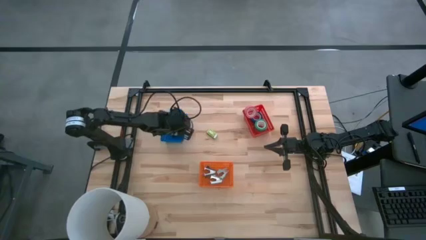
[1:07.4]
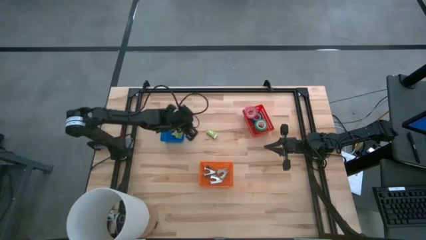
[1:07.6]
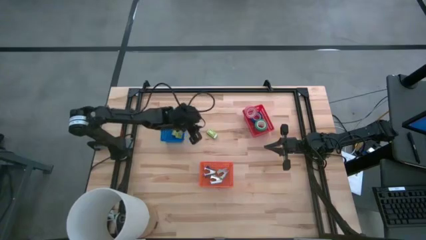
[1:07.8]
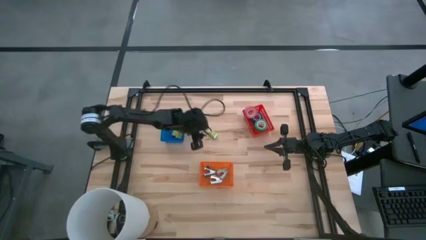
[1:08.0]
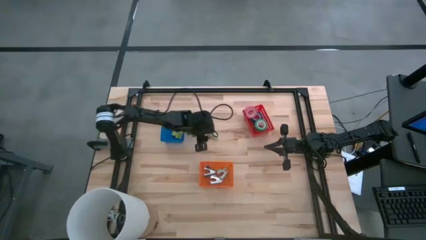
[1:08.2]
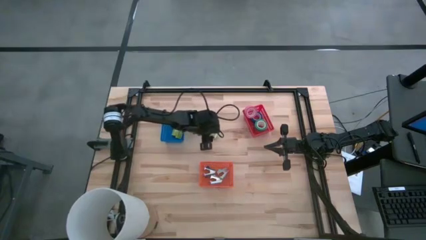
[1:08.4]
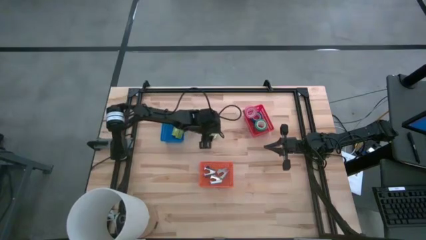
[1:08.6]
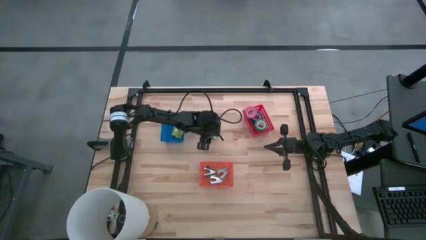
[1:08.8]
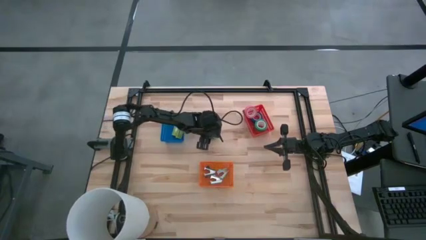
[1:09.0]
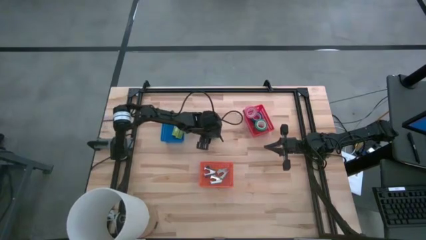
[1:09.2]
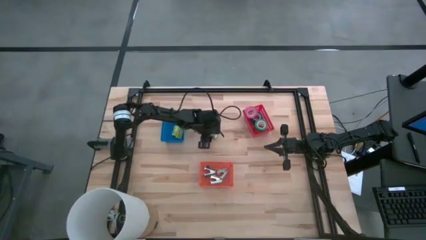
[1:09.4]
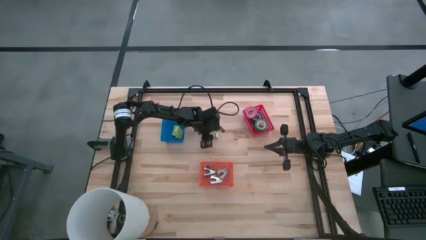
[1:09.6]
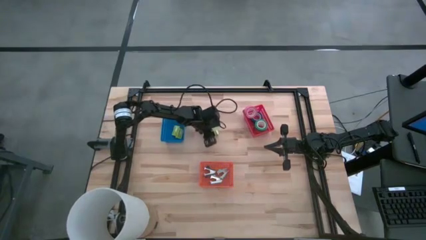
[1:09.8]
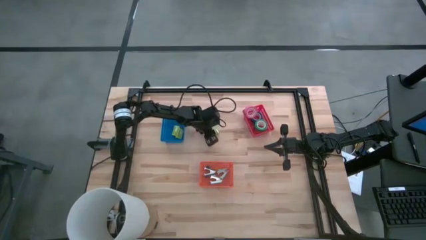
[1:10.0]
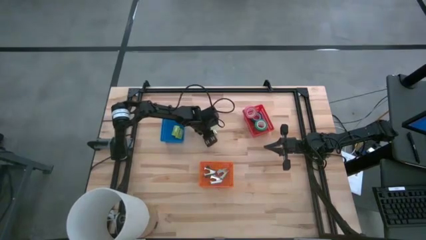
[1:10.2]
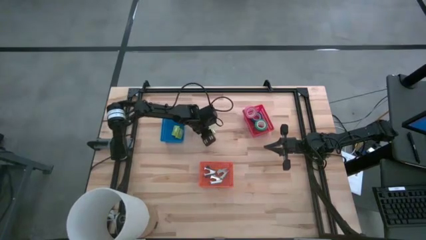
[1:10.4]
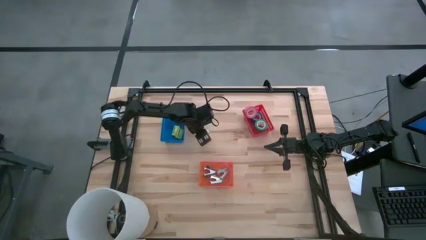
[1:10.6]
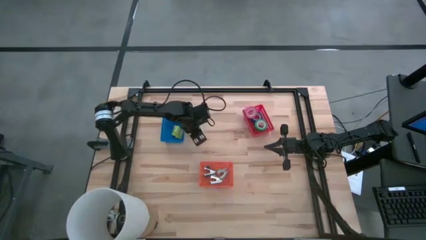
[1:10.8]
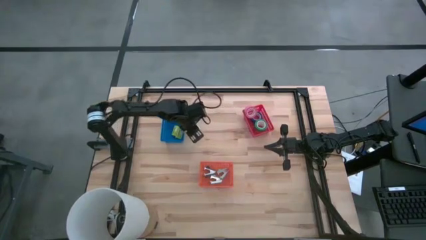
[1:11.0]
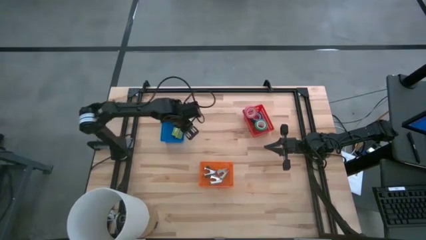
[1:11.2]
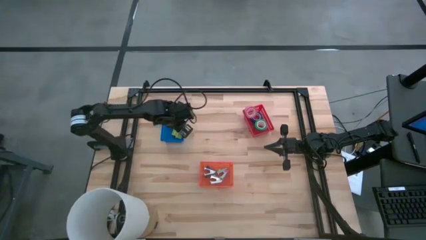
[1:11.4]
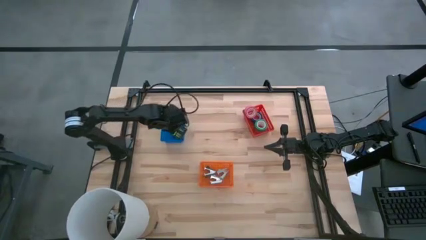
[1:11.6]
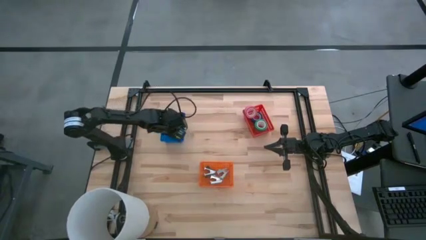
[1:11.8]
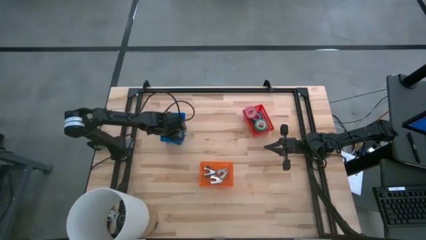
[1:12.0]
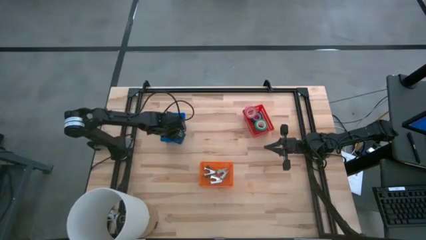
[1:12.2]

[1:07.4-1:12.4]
Task: Pick and place Stapler, Stapler remover, tape
Put the green staple wire box into the blue basket

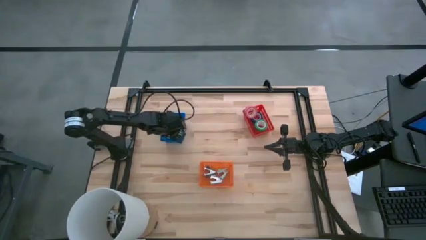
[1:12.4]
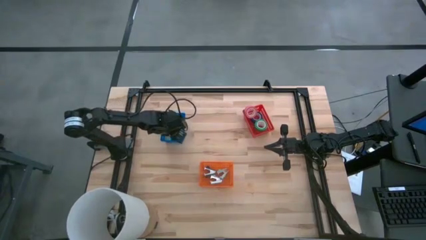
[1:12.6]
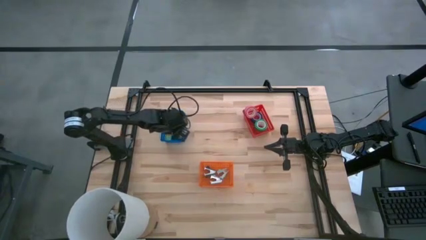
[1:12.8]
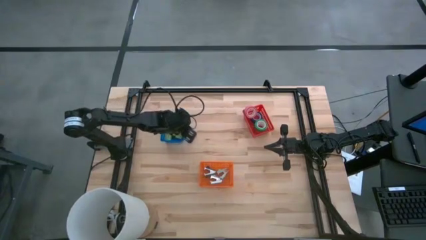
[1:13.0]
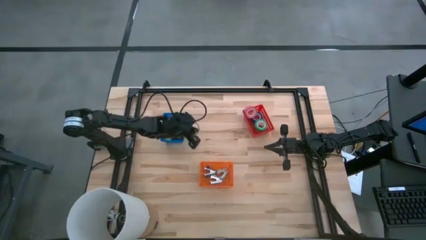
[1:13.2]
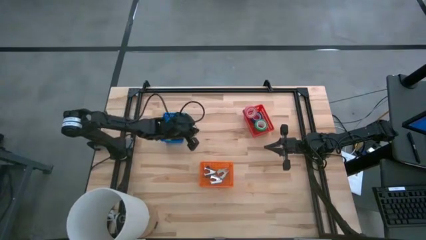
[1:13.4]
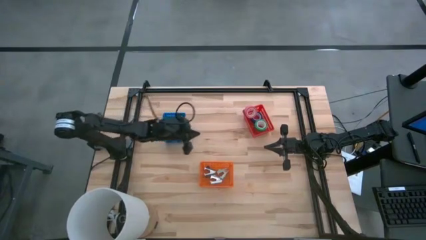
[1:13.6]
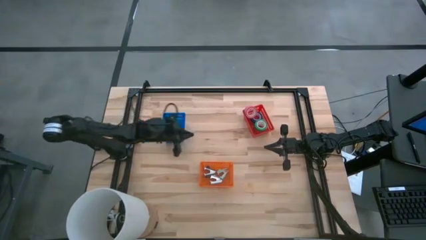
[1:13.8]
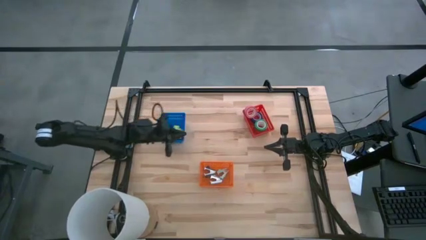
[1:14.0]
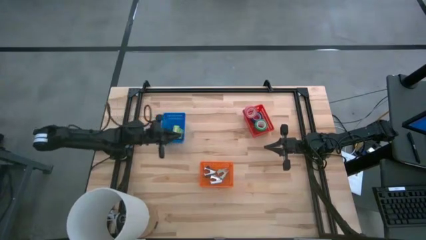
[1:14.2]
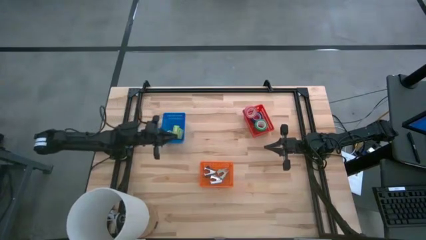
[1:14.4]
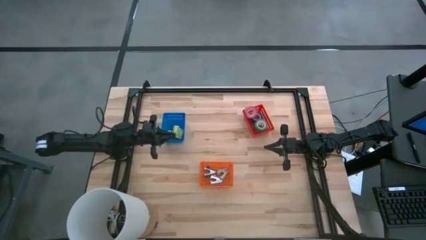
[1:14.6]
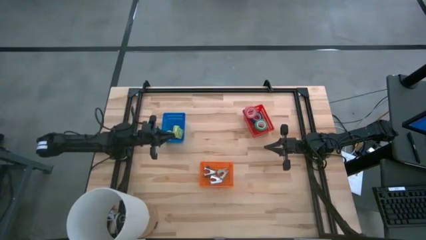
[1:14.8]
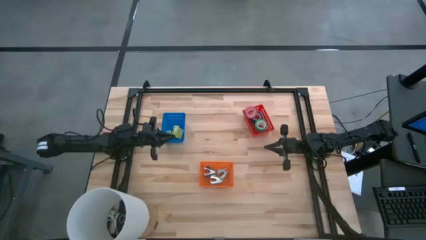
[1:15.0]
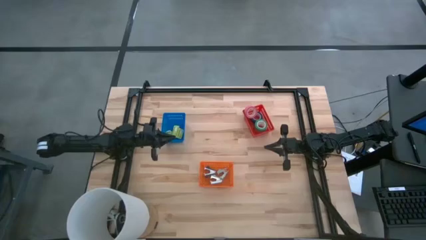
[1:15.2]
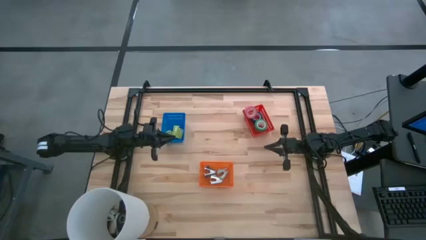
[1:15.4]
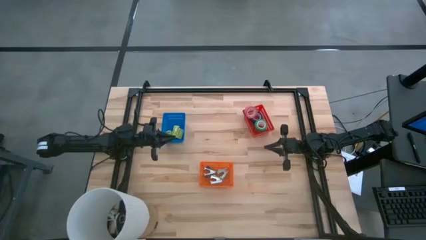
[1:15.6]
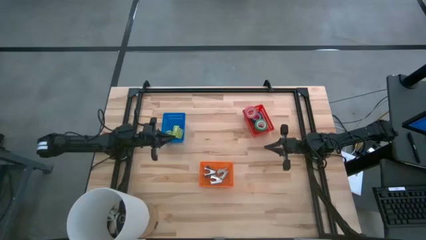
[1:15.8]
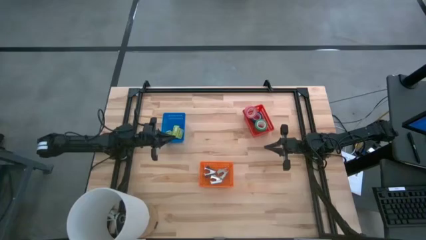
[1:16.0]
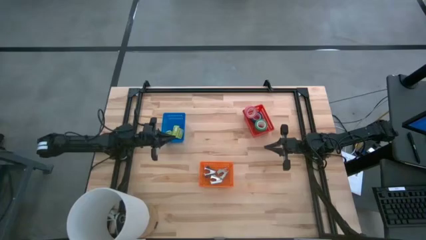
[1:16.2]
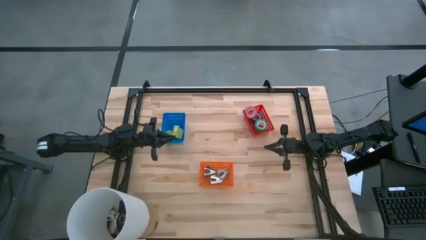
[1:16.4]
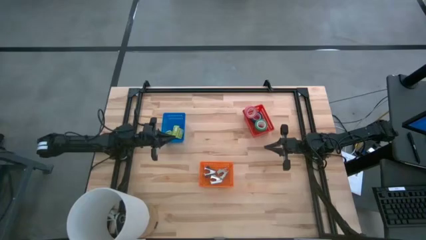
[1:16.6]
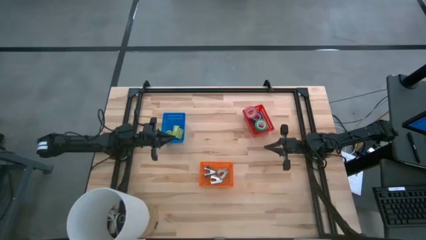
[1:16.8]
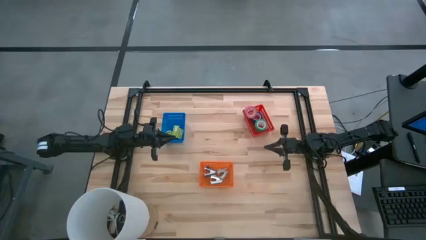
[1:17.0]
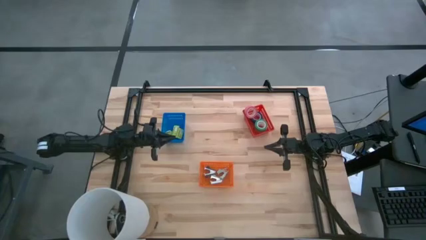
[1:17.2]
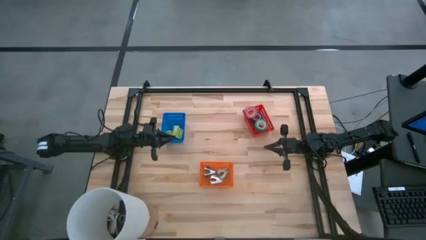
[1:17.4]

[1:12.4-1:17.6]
Return to Home Position

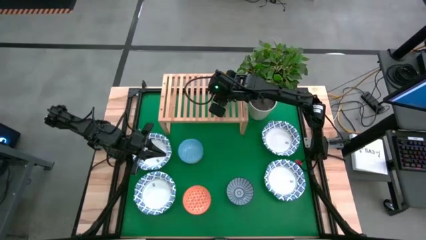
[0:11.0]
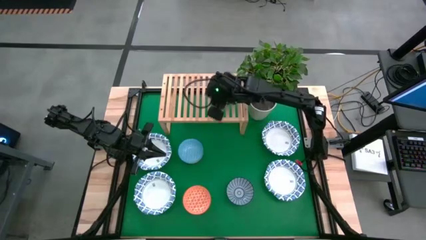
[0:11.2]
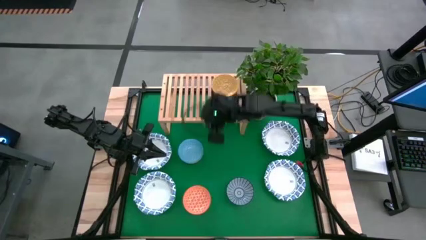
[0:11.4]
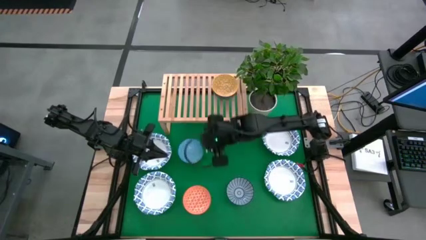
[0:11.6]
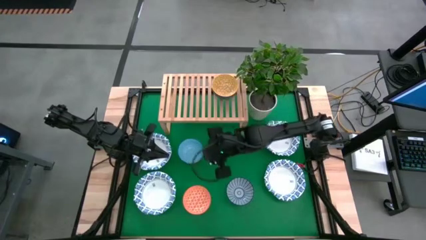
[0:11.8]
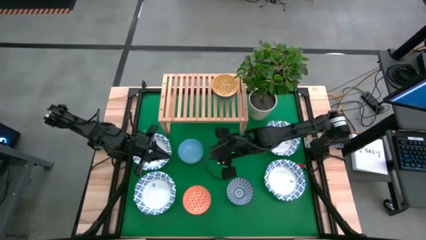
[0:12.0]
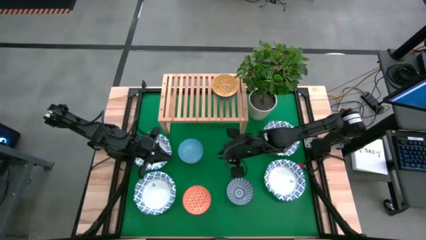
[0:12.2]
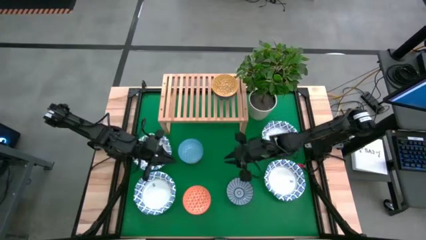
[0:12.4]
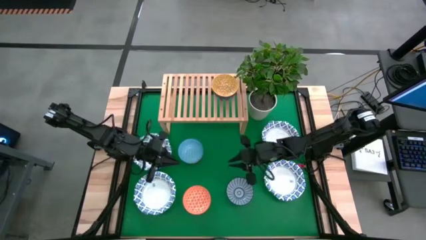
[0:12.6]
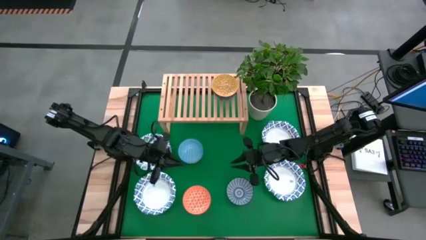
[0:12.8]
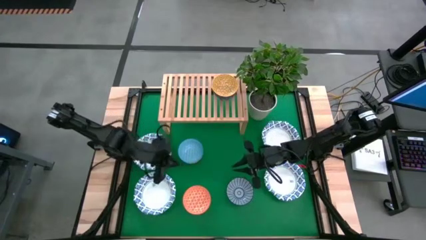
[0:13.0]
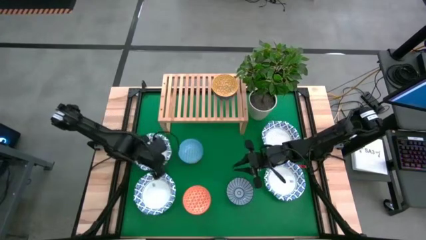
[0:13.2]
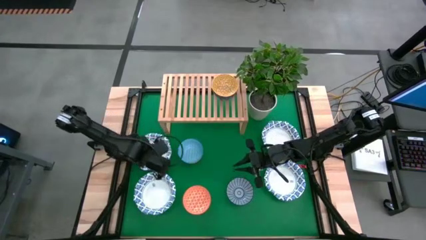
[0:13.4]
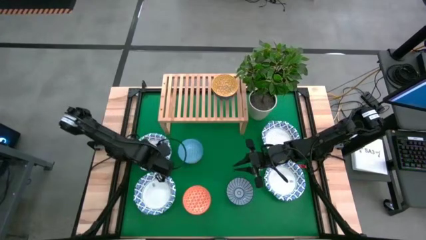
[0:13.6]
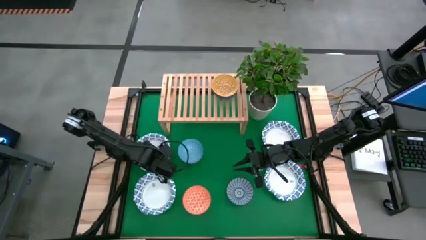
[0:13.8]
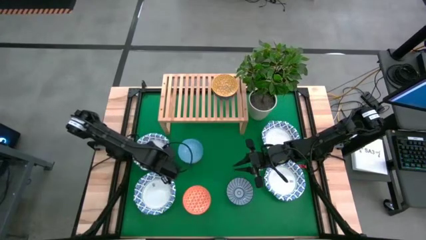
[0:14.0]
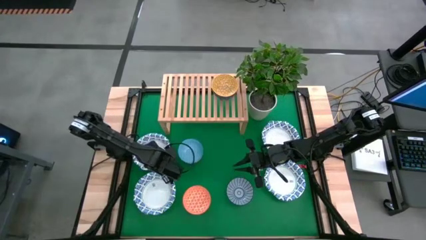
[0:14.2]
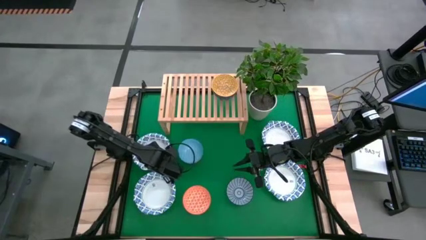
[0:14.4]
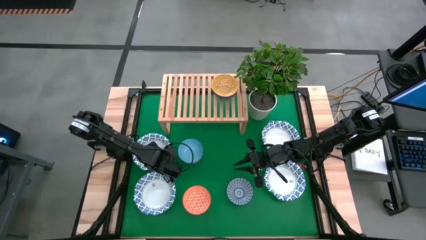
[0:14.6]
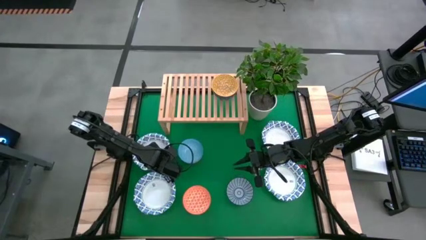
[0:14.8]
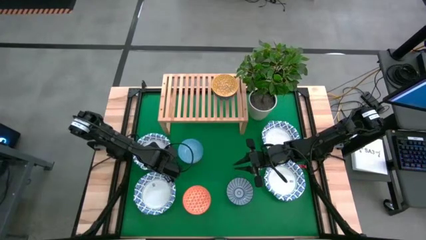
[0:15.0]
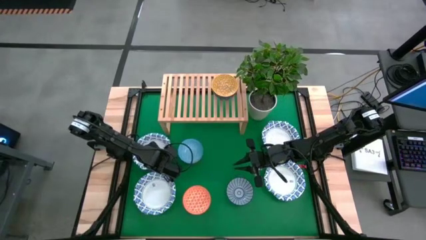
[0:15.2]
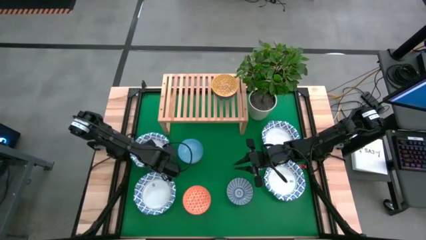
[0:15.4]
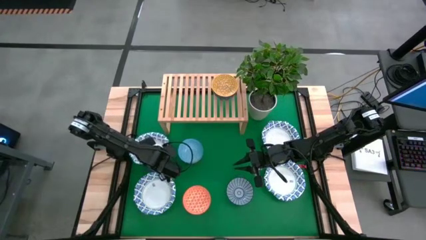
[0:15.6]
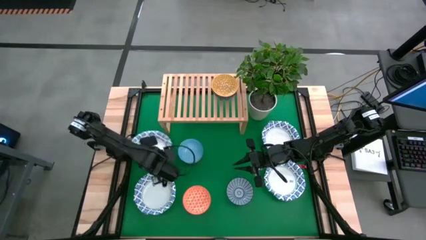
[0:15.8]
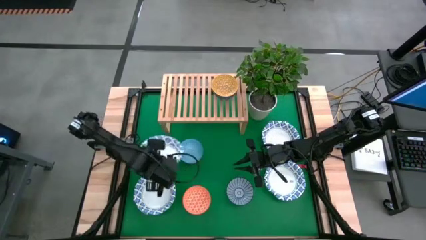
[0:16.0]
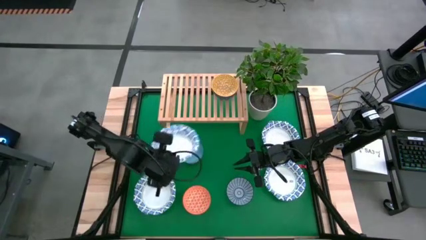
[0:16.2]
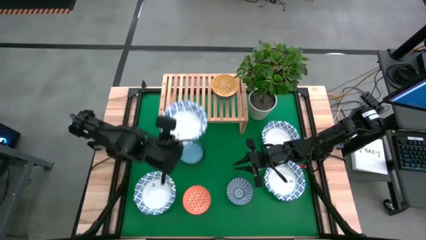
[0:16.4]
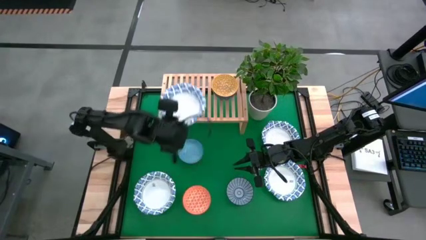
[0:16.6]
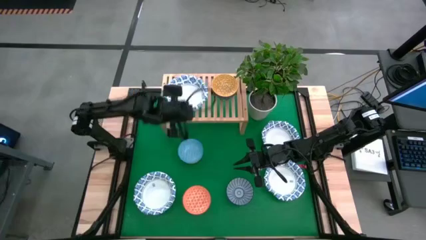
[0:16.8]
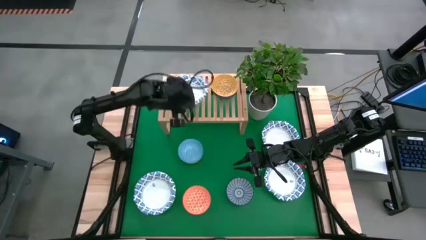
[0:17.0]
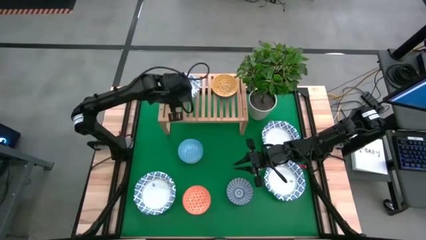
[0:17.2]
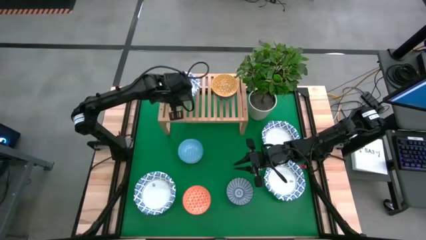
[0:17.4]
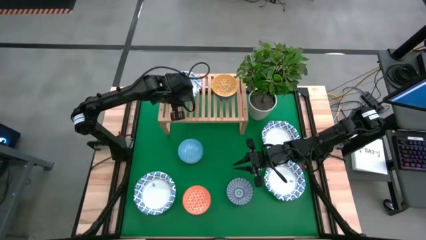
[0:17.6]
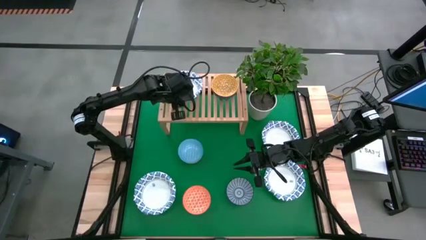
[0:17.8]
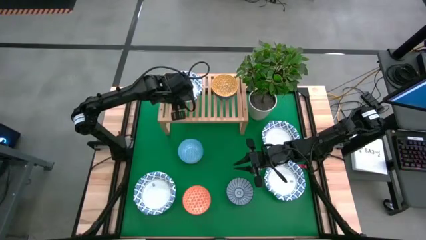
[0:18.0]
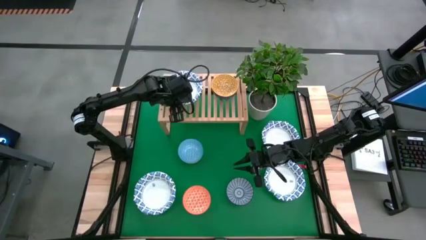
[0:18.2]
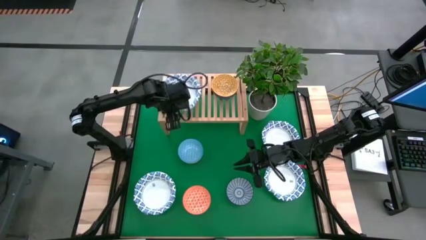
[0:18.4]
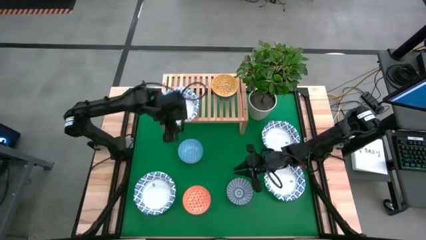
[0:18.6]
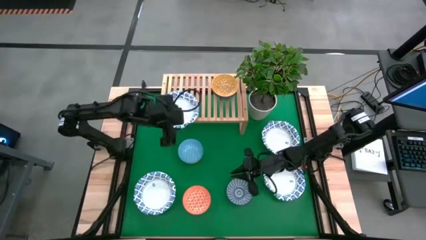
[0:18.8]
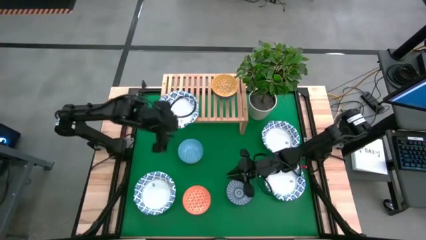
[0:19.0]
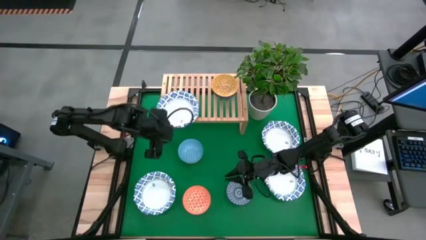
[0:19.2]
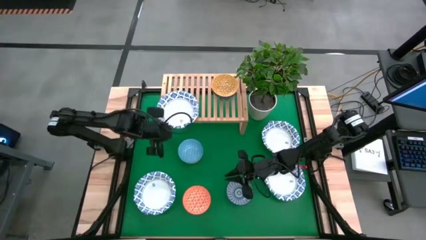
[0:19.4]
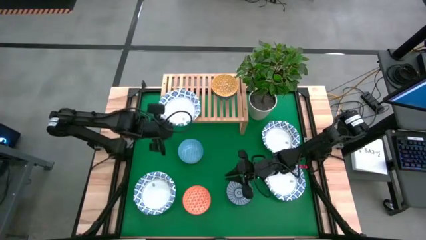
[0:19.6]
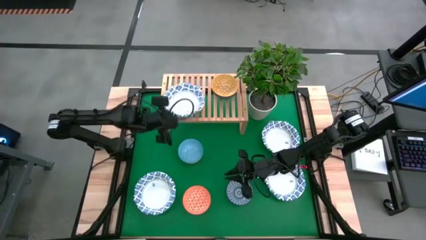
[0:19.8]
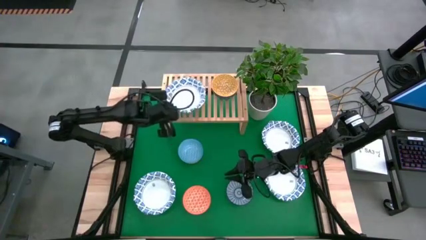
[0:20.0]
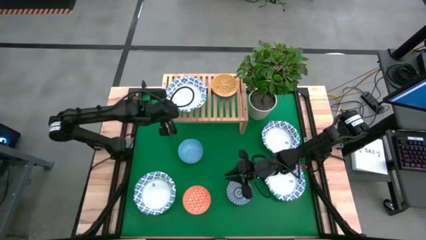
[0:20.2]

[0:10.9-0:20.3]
Task: Place and stack bowls onto a shelf
Put the big white bowl on the shelf
